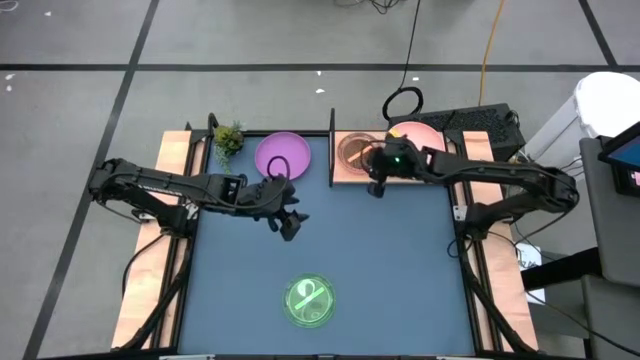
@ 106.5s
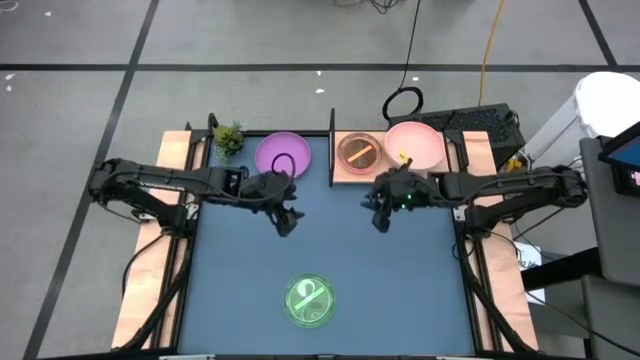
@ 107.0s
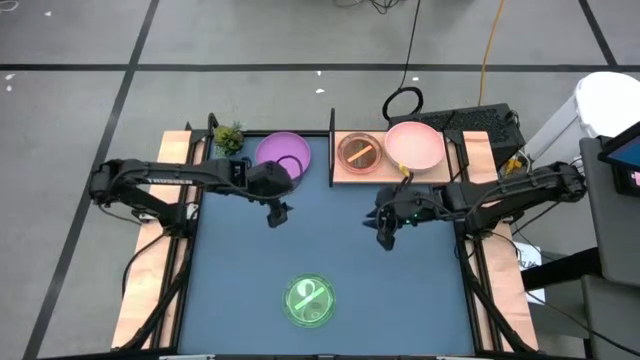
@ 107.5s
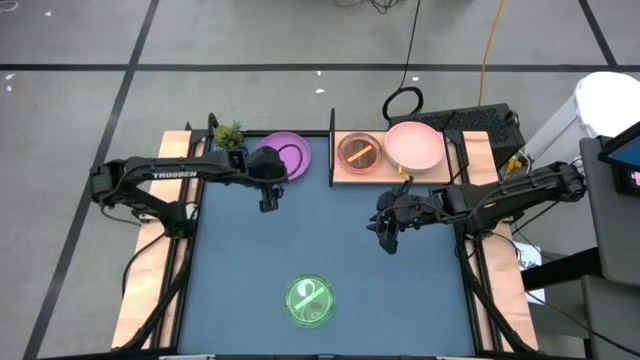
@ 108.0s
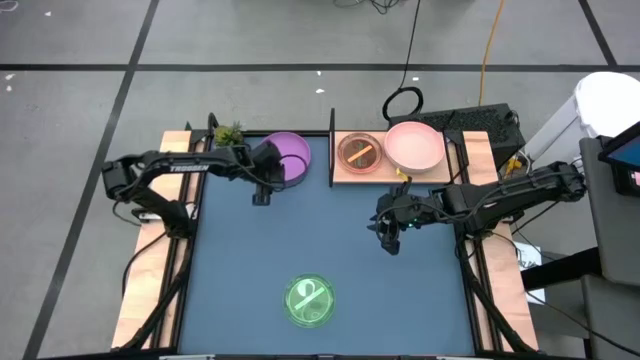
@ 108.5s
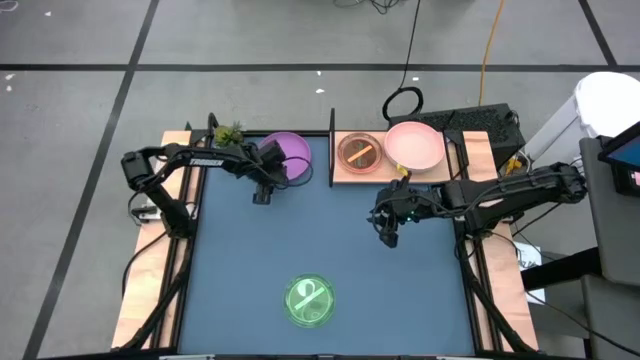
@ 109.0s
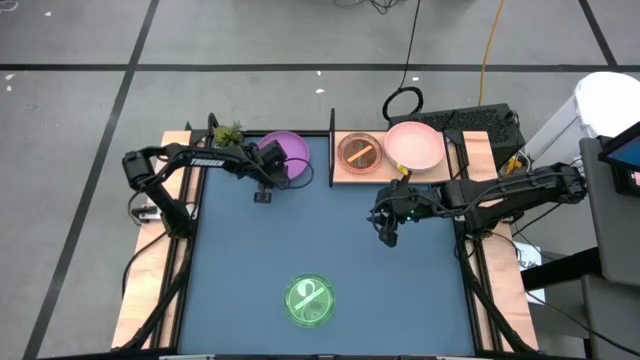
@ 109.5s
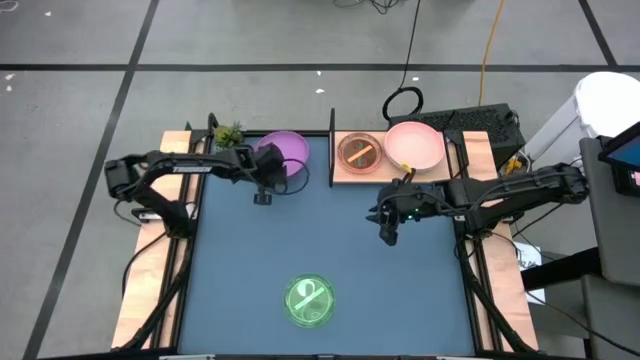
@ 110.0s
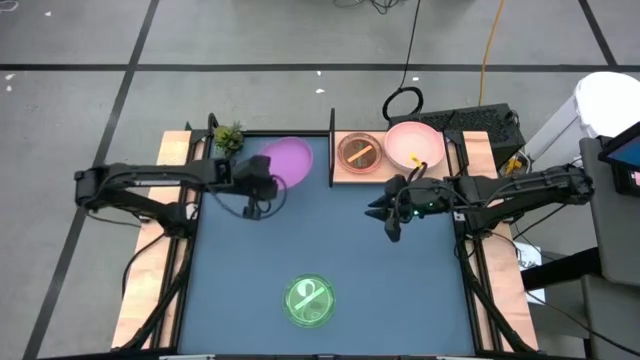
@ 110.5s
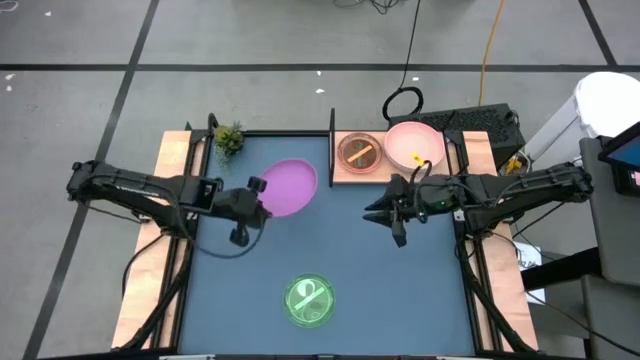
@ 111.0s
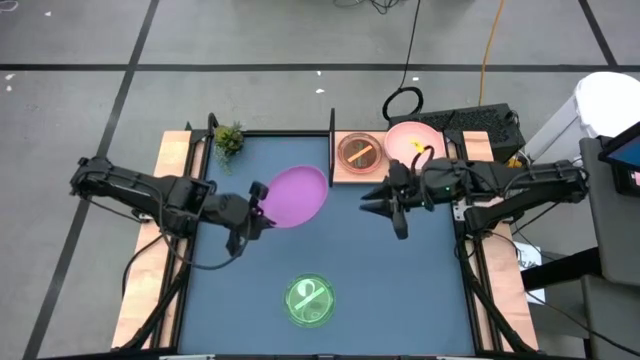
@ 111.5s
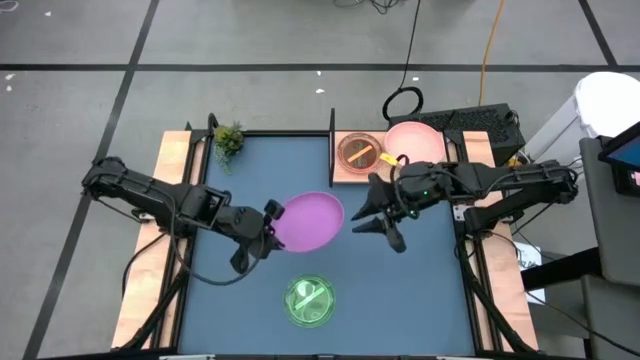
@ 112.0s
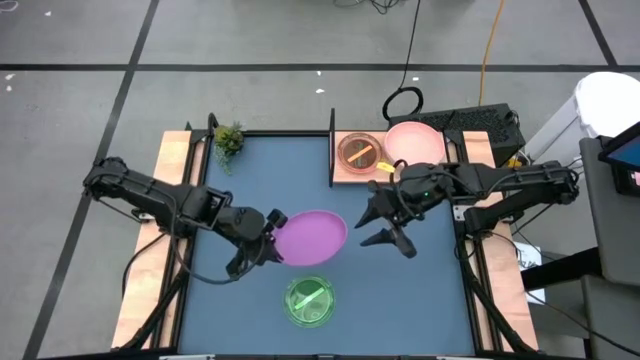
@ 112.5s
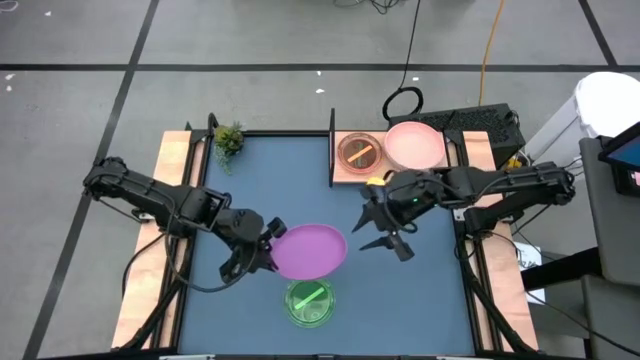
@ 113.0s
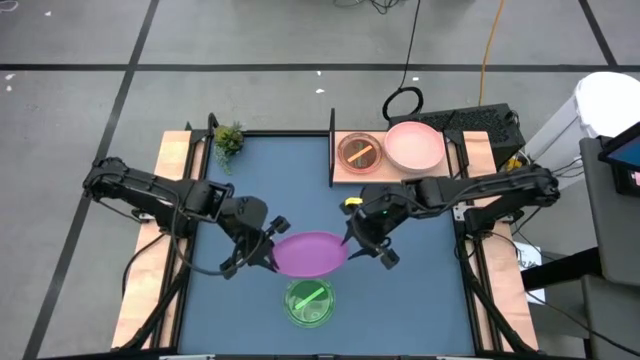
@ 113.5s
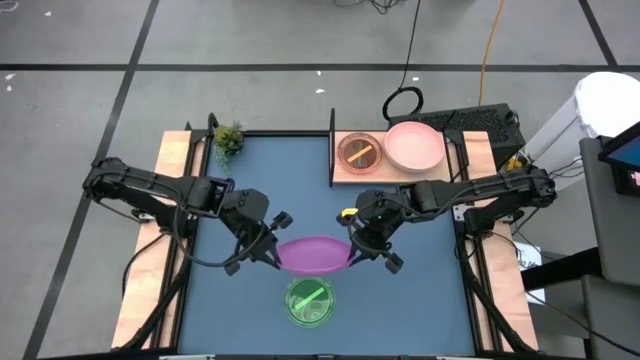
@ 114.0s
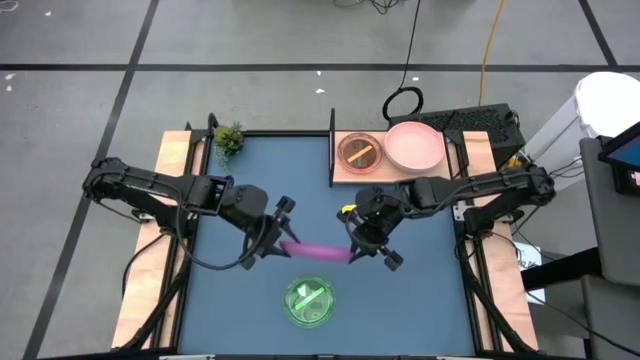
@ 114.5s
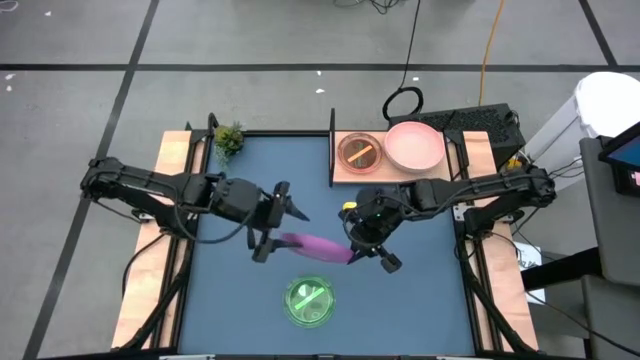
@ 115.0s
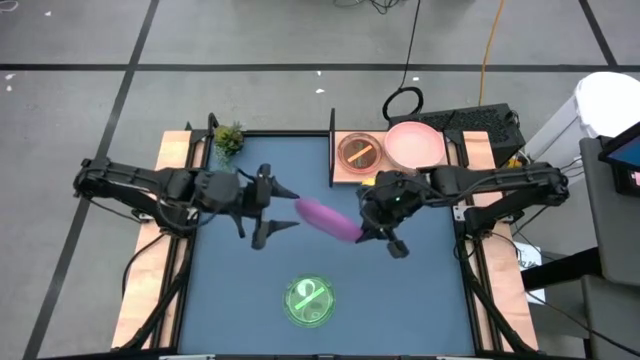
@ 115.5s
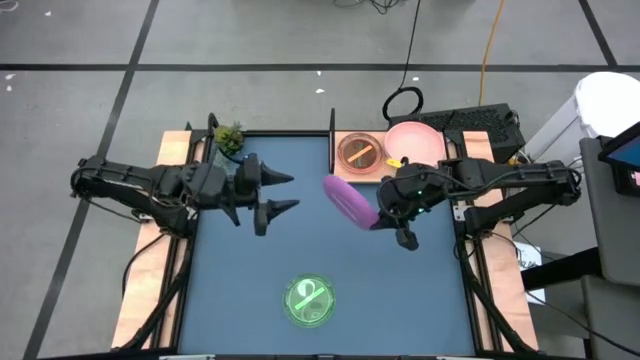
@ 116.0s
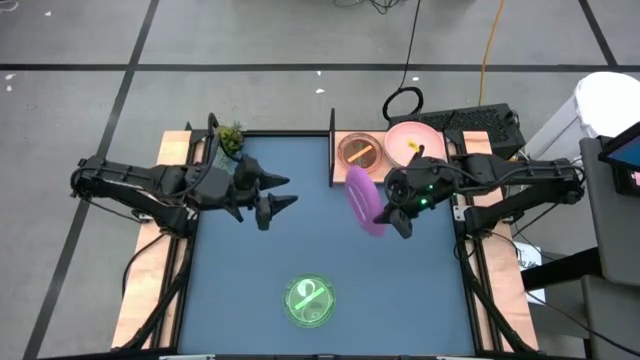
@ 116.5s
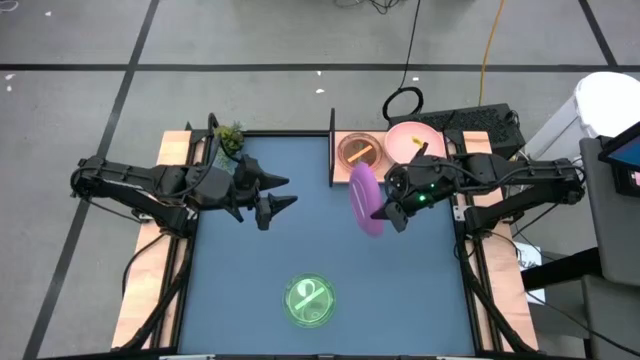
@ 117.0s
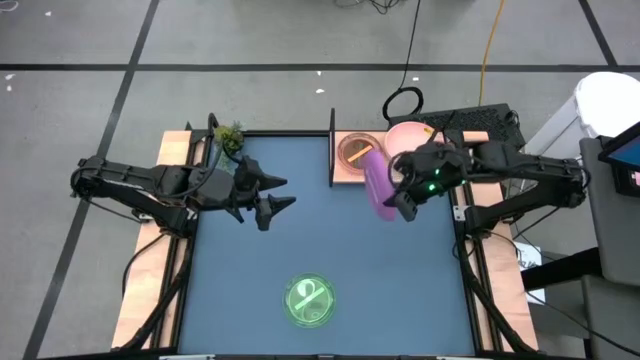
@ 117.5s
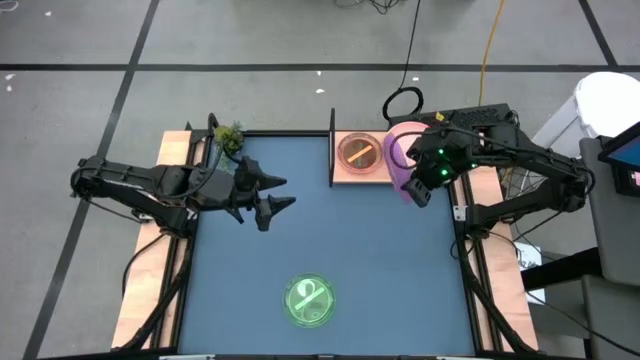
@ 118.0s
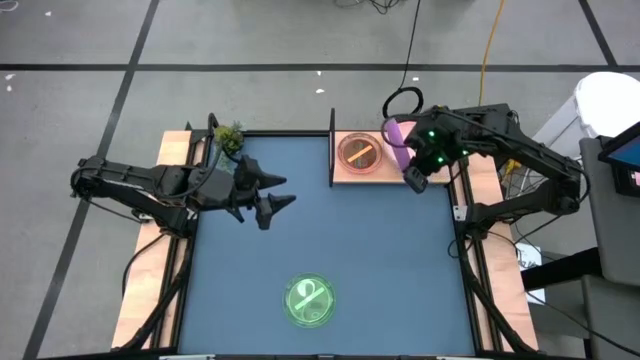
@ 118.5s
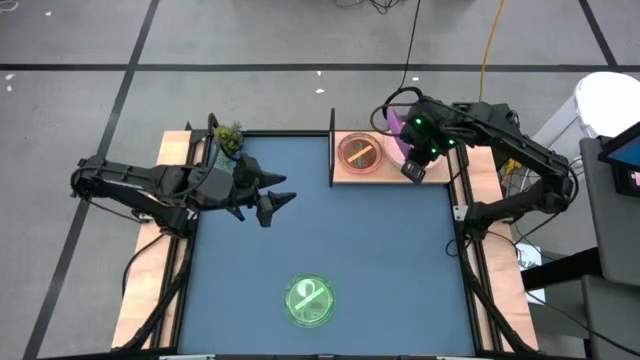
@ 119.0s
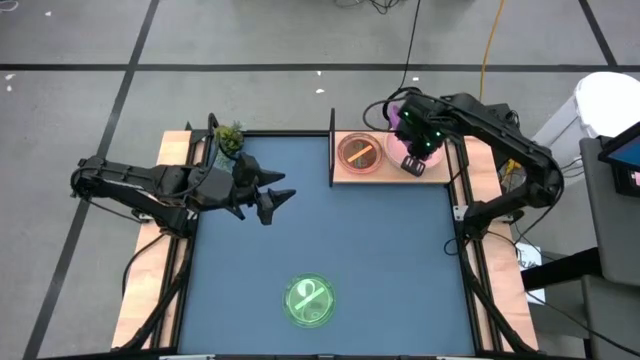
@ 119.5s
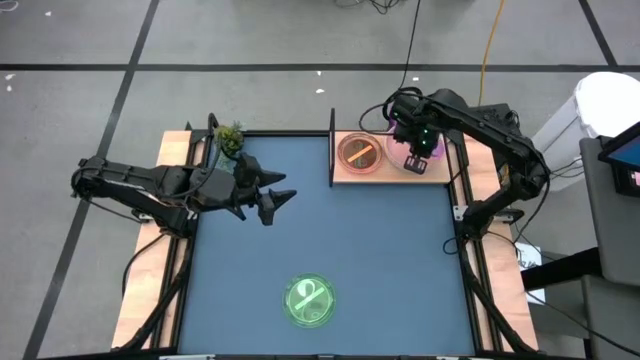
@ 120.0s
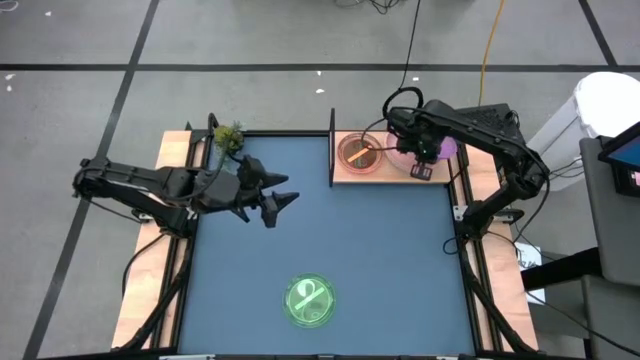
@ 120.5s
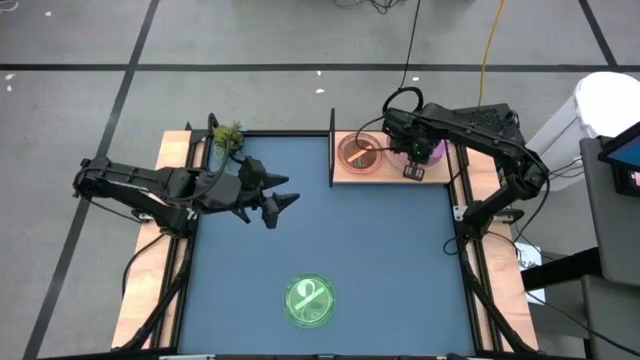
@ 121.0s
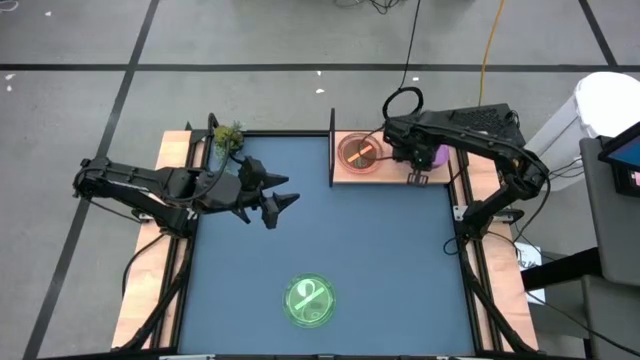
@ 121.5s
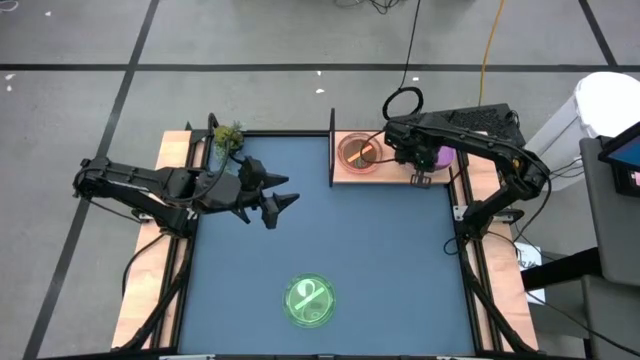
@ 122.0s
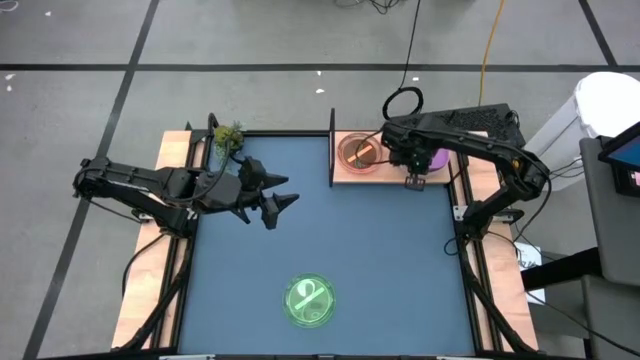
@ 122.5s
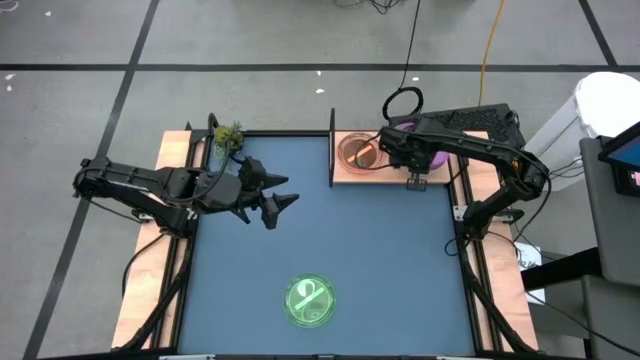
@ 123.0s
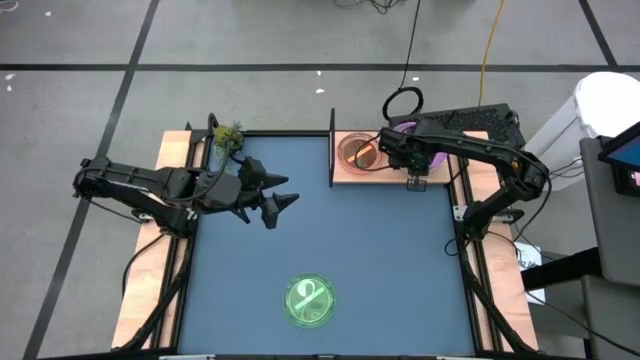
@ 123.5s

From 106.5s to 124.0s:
Task: Place and stack plates onto a shelf
Stack the purple plate on the light brown plate on the shelf

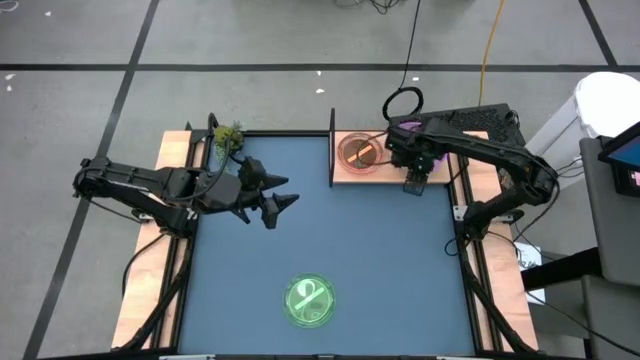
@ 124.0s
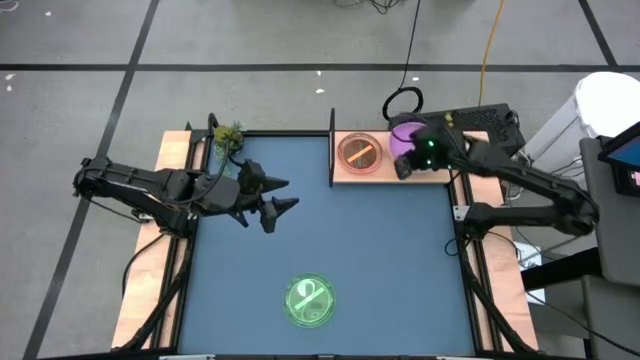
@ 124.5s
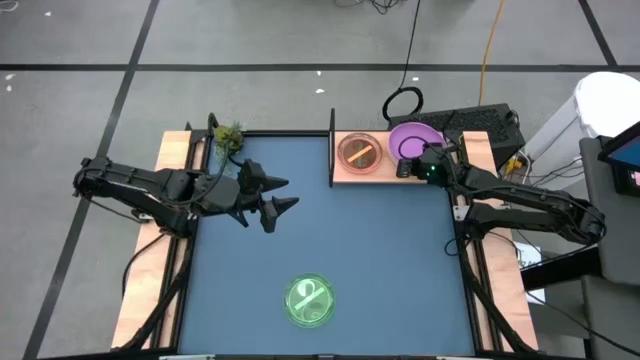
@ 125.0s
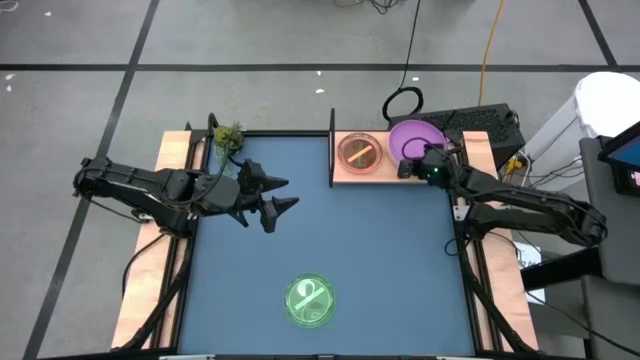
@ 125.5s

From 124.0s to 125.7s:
Adjust the plates

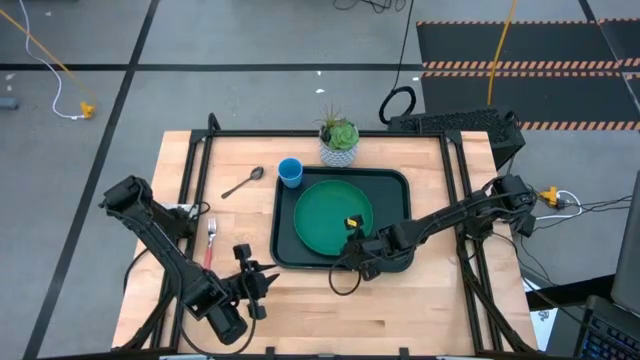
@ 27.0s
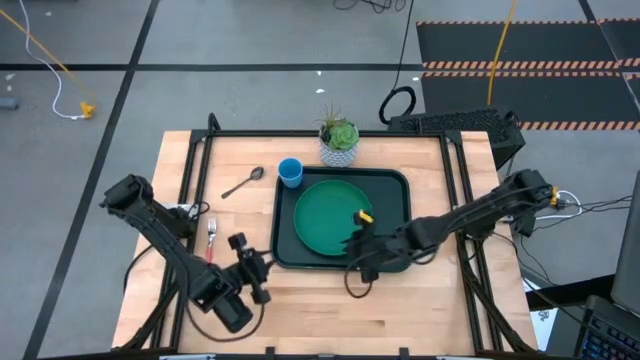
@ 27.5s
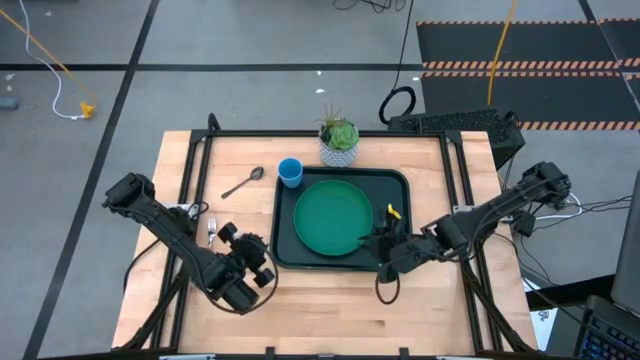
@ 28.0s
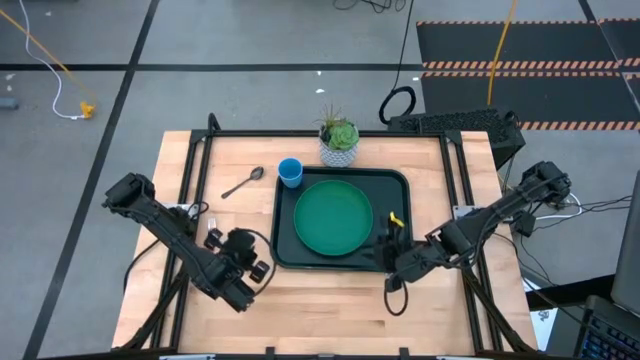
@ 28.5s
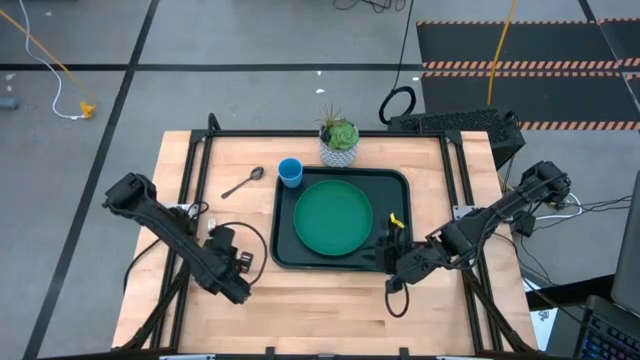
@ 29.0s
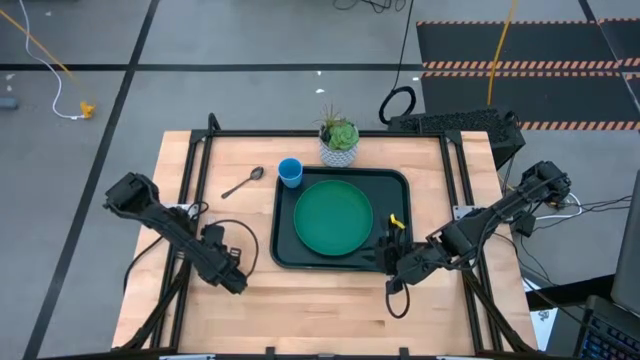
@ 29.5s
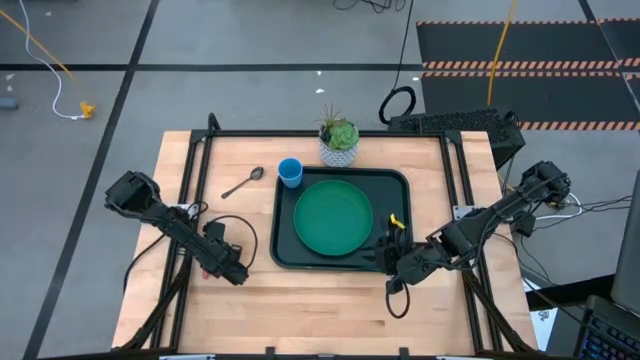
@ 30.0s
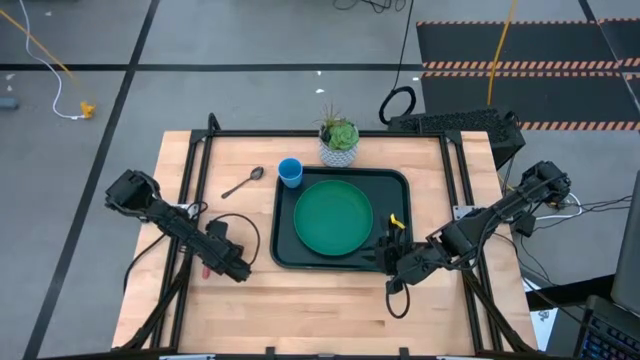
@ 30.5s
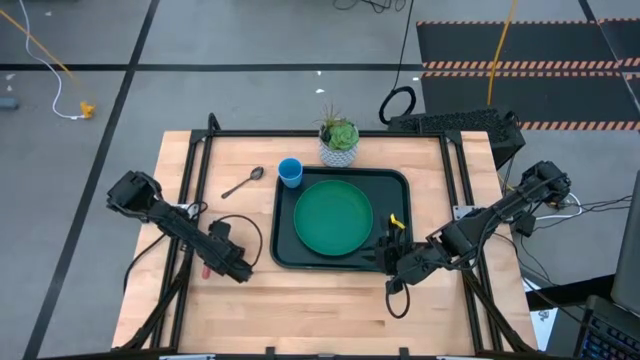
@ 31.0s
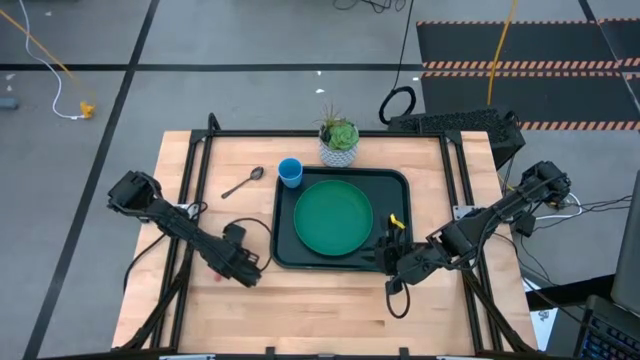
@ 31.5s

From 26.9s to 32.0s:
Task: Pick and place plate/cup/fork/spoon on tray
Put the pink fork to the right side of the green plate on the black serving tray
